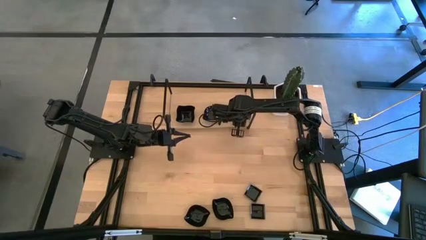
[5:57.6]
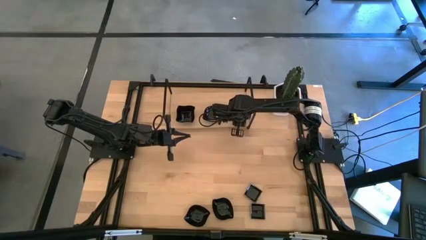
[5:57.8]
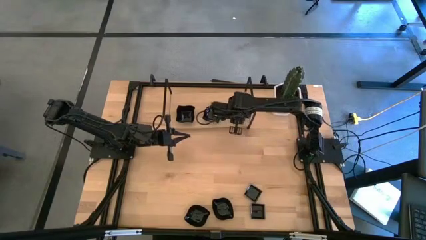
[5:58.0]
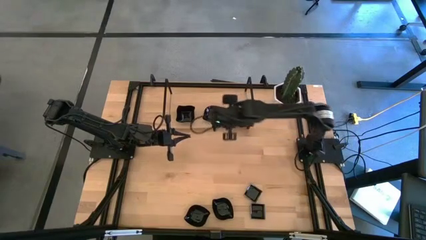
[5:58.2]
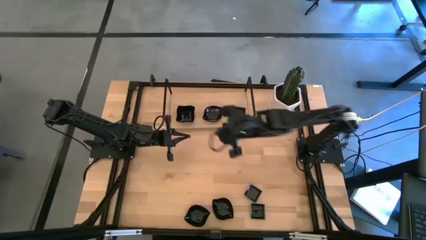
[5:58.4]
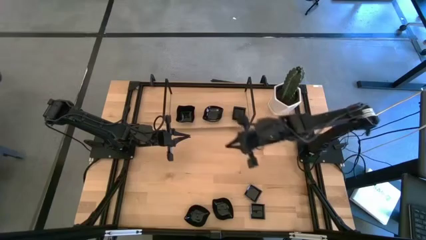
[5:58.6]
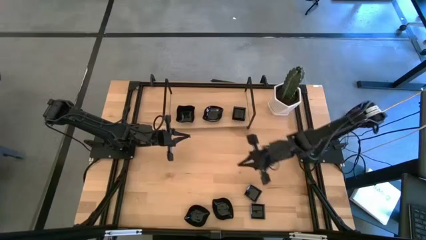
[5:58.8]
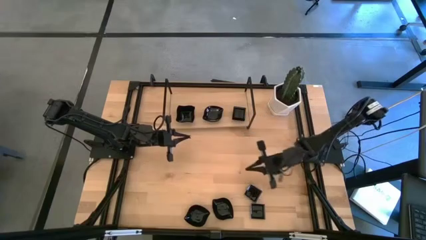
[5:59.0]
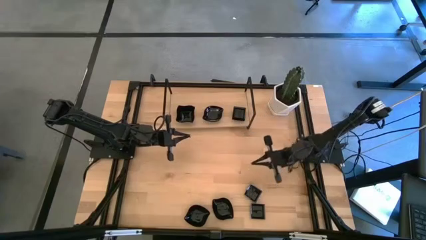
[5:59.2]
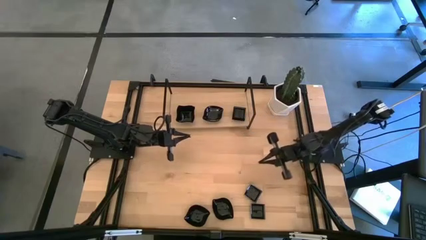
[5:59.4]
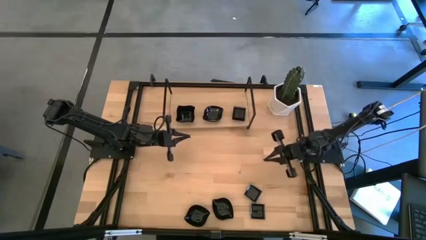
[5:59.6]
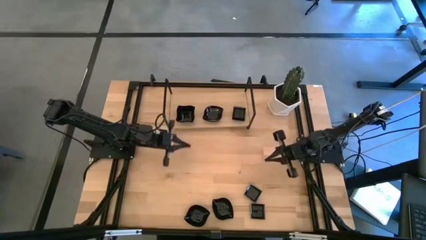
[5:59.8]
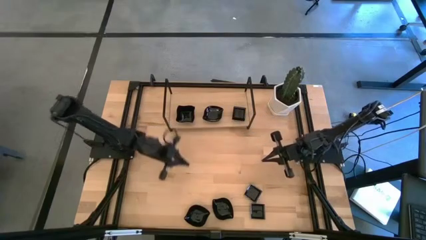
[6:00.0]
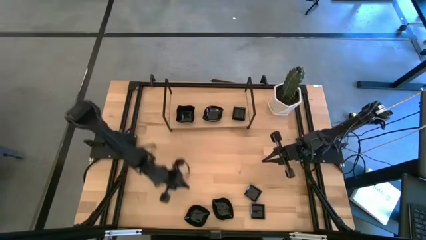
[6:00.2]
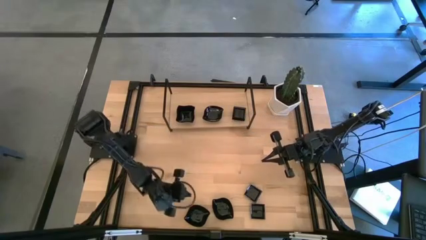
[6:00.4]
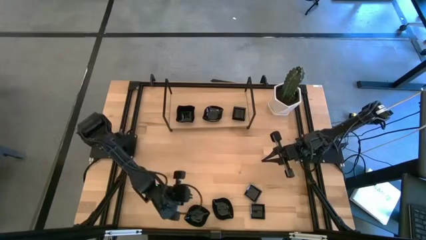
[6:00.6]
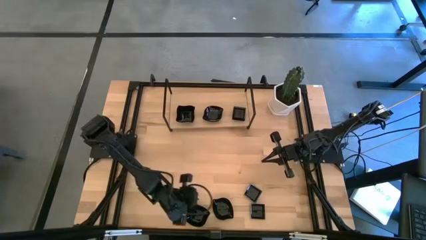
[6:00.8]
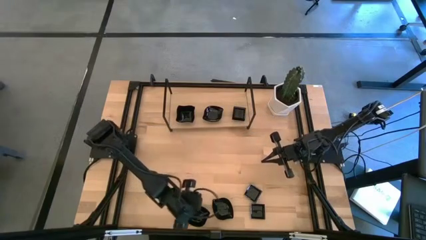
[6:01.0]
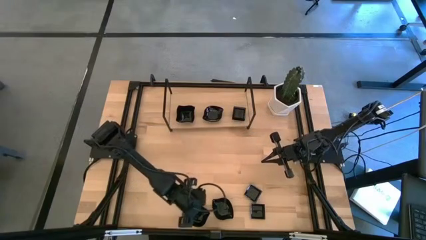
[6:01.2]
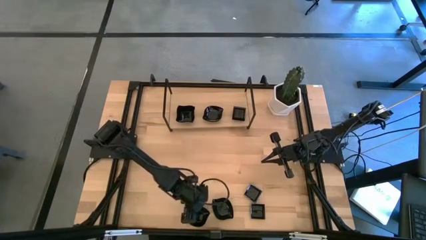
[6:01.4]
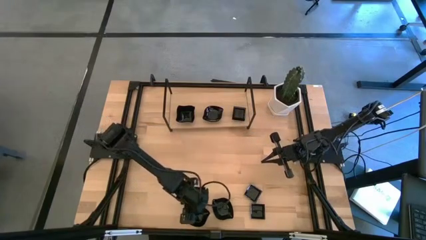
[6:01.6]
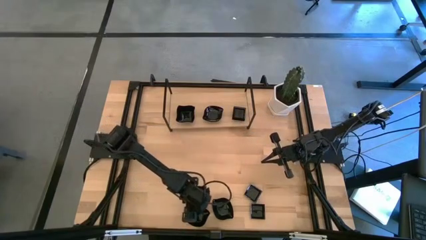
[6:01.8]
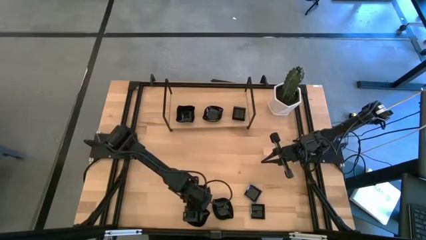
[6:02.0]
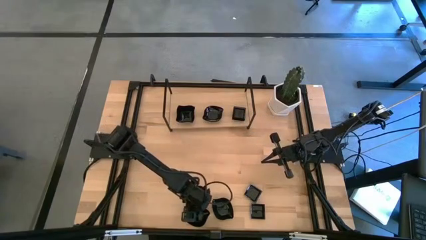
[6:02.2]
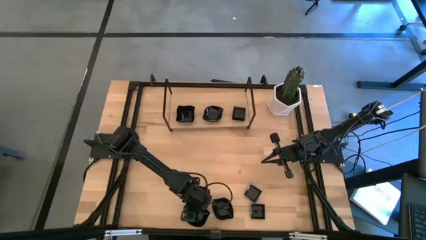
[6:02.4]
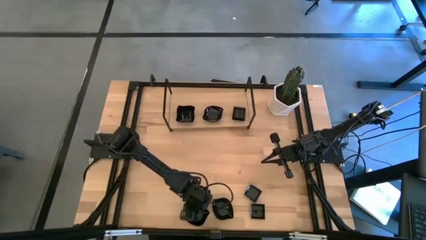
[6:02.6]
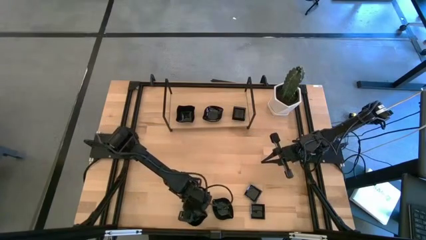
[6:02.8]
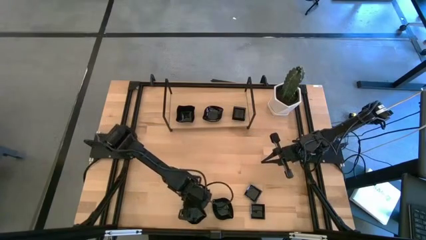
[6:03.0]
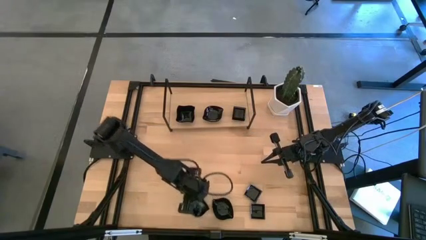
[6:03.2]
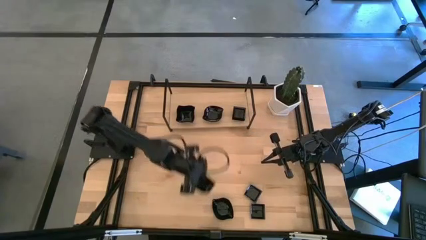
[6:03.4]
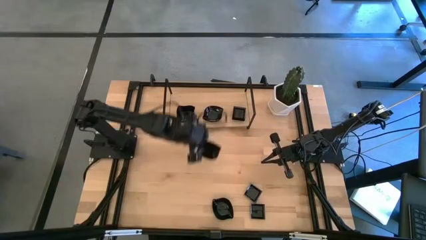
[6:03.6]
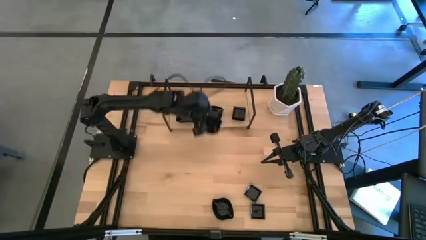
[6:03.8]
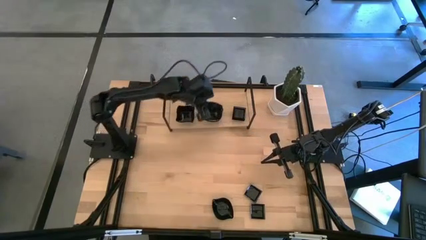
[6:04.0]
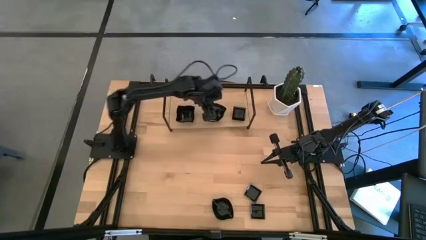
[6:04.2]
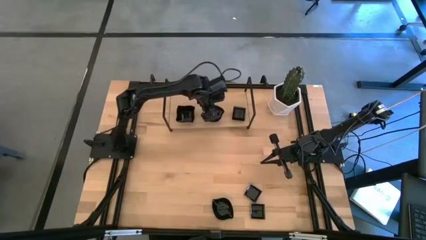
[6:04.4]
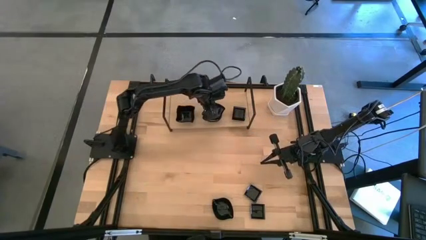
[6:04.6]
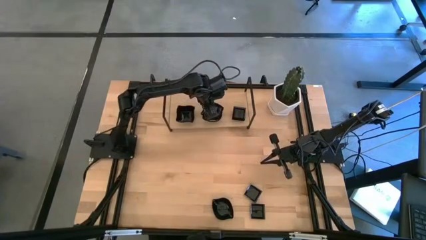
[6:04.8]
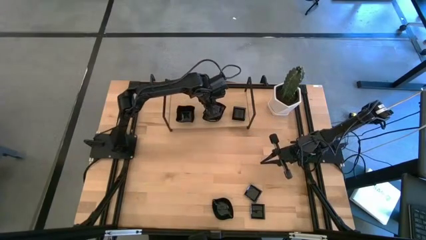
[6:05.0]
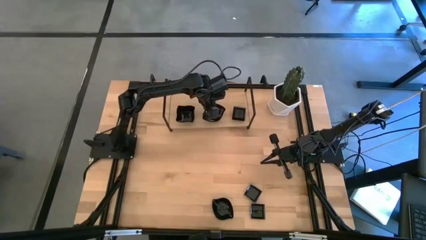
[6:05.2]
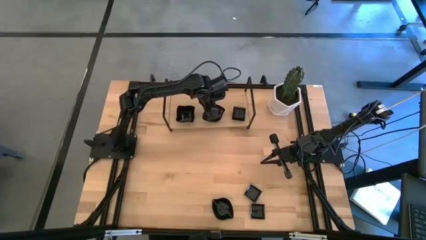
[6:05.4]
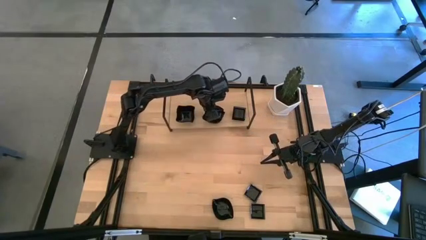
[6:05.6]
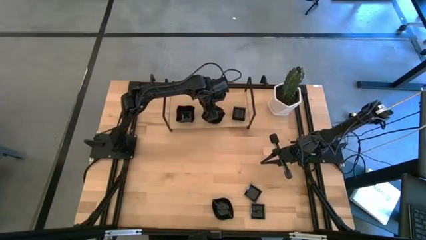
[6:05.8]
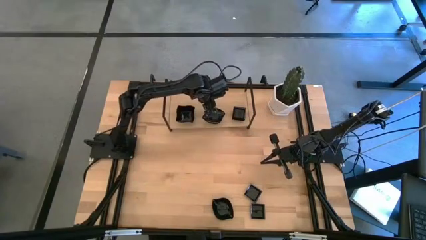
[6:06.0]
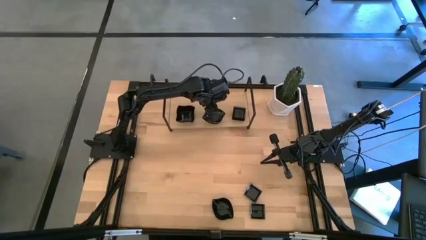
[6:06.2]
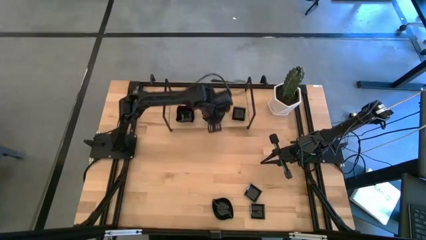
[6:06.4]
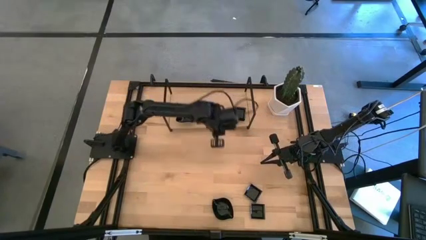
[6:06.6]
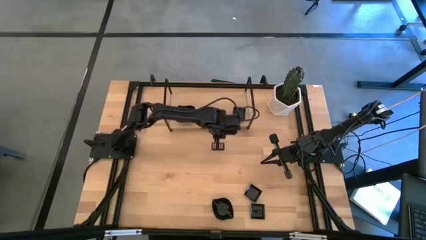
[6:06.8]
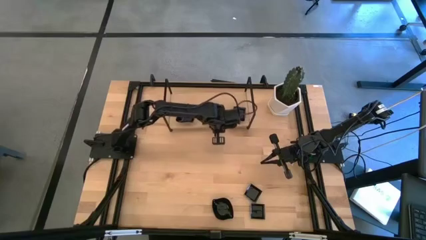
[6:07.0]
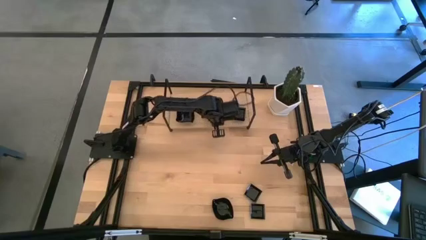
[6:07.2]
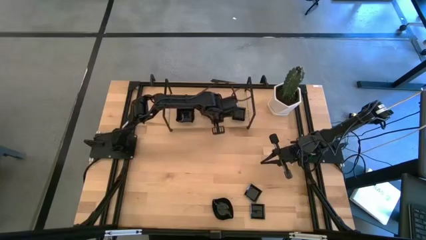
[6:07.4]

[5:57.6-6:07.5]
Task: Pick & Place Mini shaped plates
Stack the left leaf-shaped plate on the top of the leaf-shaped plate on the shelf

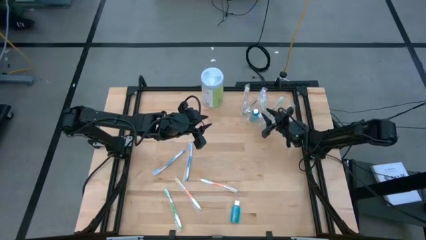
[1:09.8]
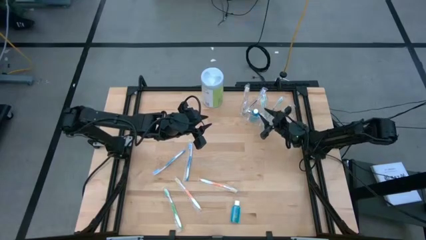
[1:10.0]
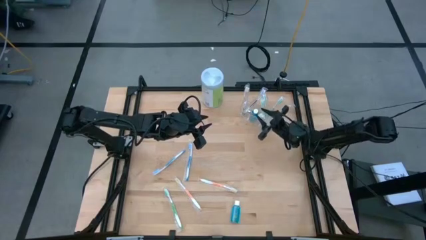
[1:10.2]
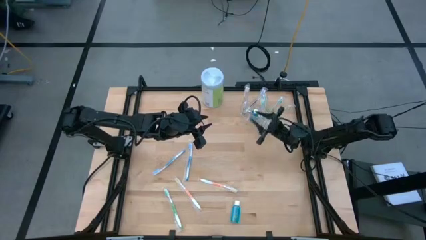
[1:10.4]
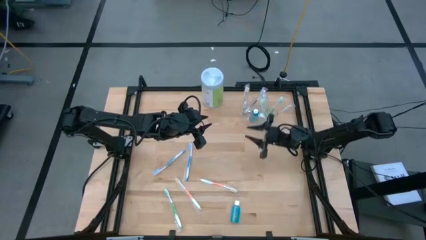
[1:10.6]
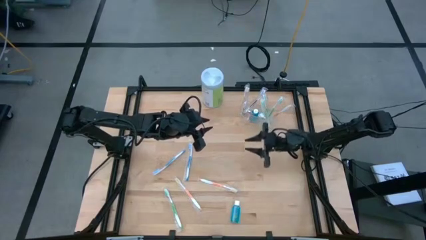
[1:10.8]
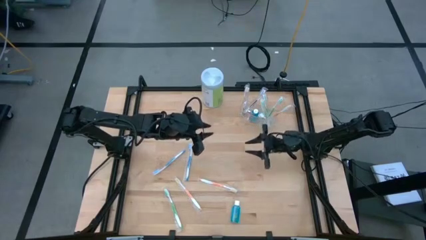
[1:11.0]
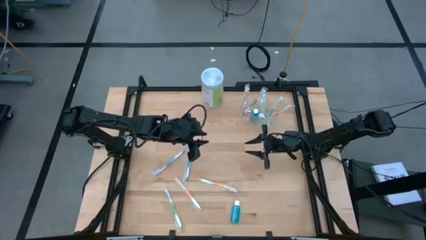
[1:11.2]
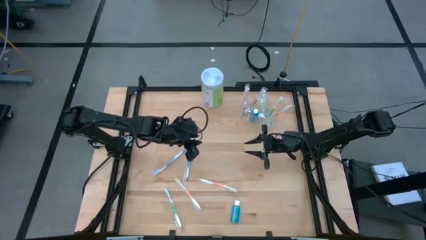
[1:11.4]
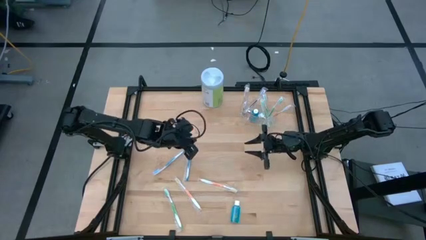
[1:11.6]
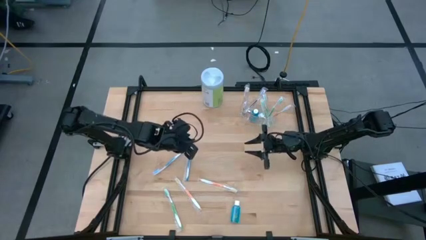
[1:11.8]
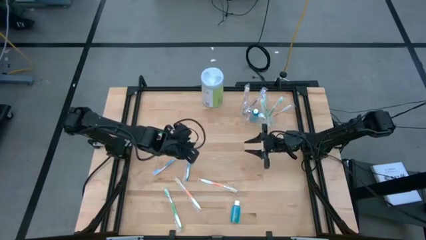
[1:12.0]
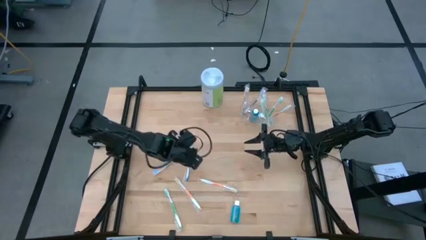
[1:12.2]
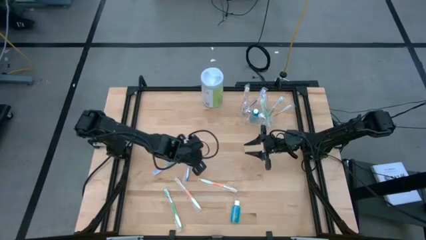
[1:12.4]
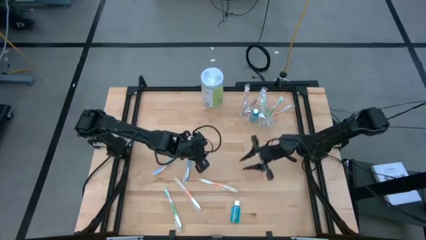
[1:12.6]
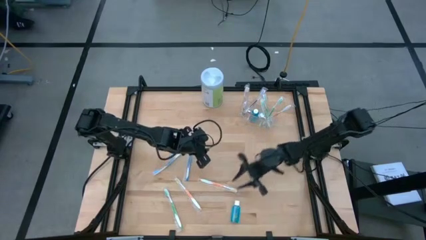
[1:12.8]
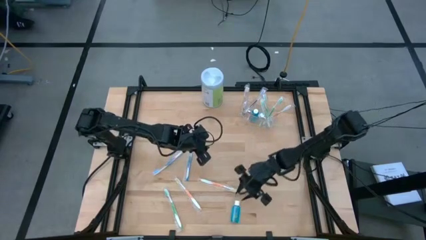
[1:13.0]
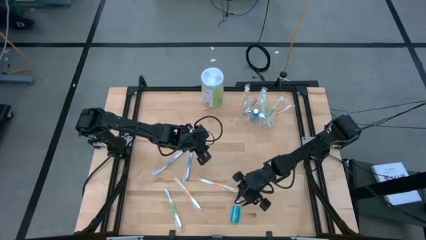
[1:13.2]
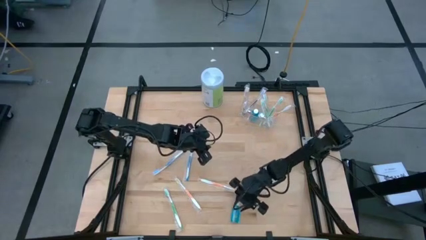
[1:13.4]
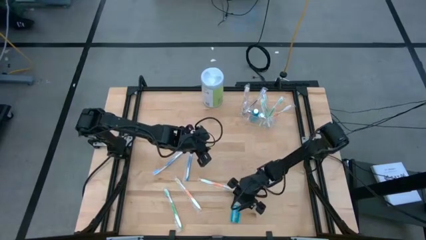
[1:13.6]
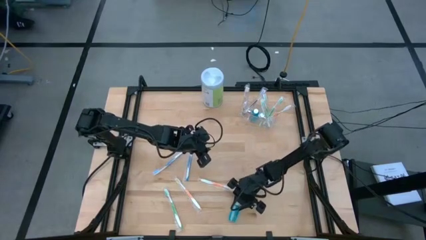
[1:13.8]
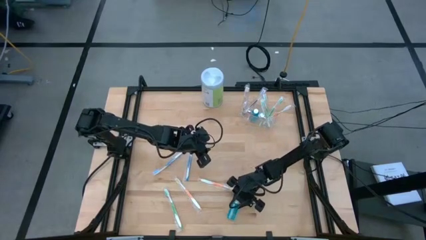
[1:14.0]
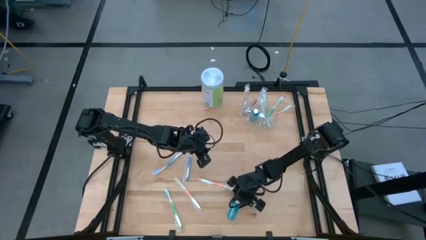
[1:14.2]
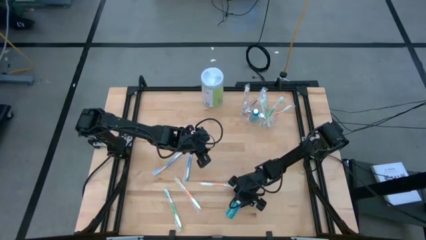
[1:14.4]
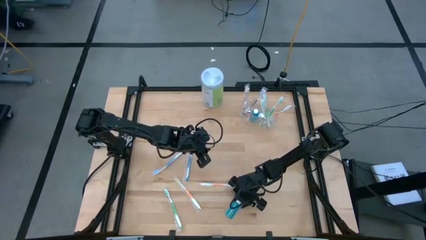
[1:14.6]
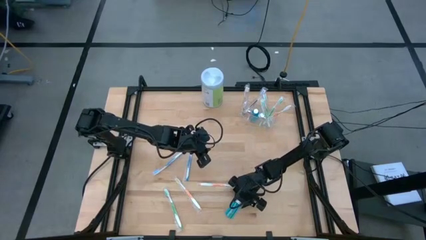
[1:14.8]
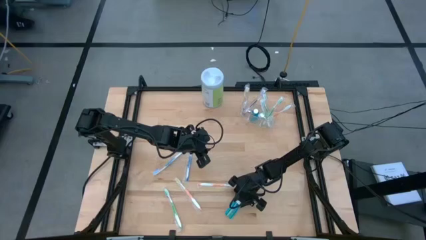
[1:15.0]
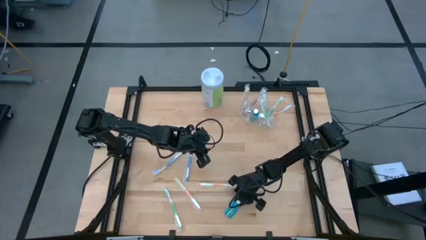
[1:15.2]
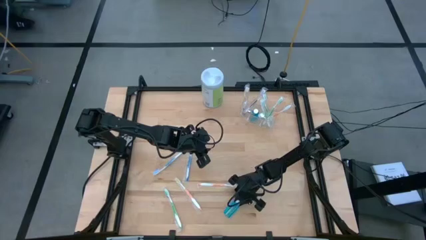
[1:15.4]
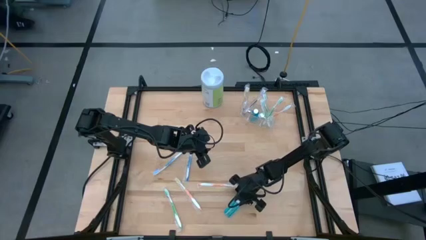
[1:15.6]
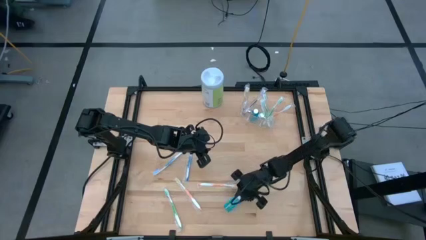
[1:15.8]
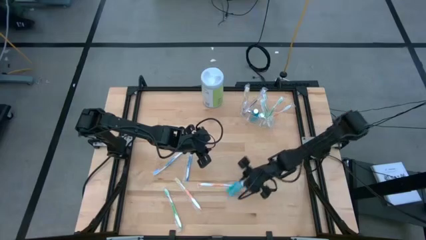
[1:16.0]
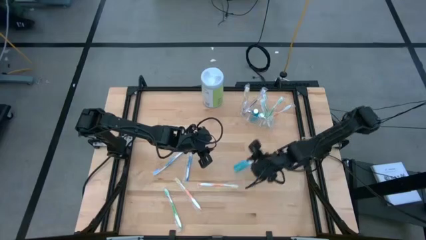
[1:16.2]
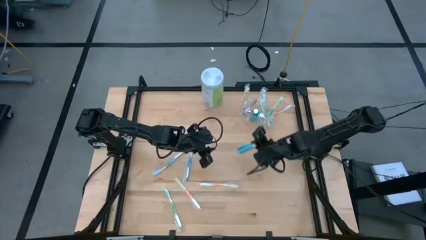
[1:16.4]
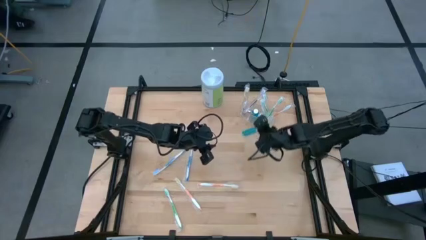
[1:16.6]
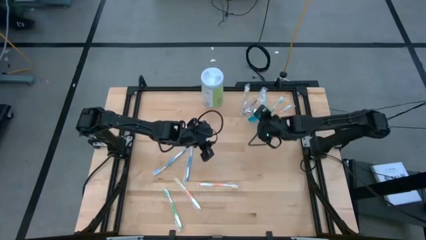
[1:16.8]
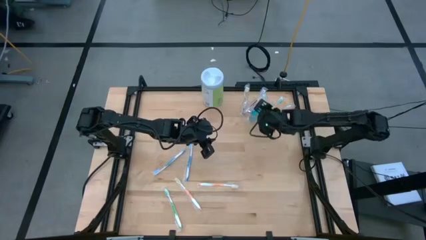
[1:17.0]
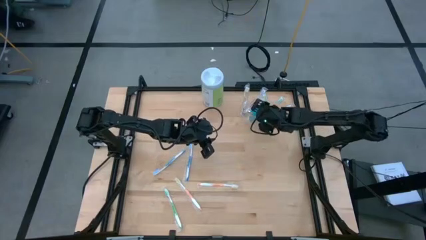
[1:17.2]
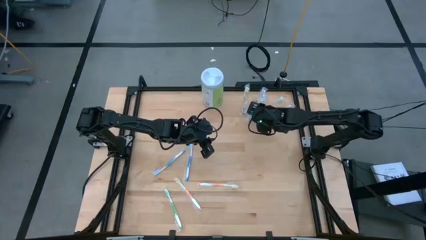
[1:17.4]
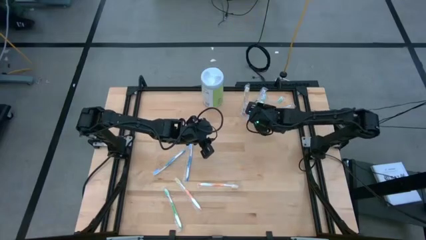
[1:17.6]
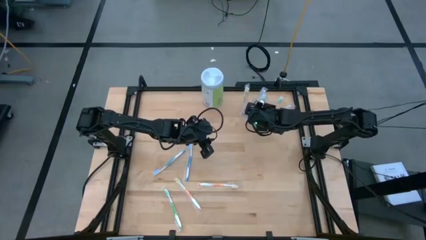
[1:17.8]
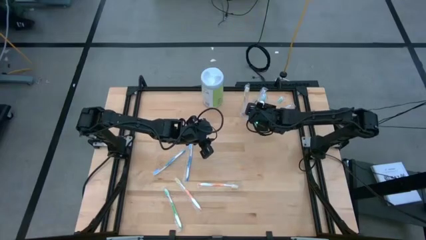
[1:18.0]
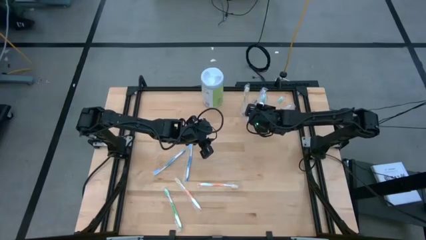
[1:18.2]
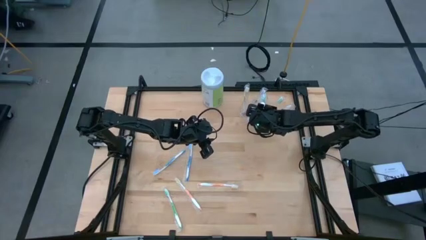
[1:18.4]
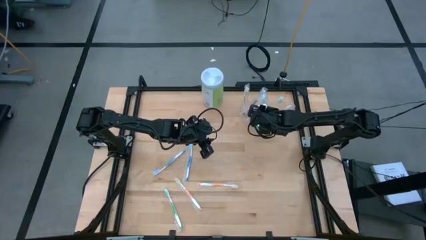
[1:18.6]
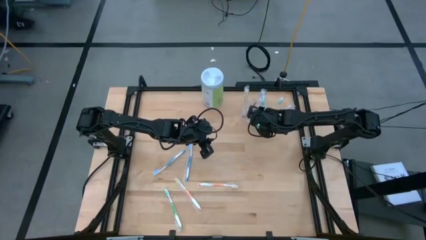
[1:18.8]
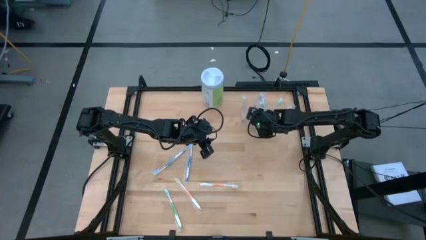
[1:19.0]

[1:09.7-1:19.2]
Task: Pick & Place toothbrushing station
Put the blue mouthwash into the transparent organizer
